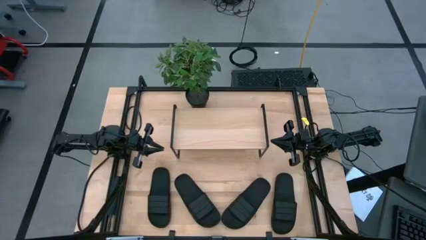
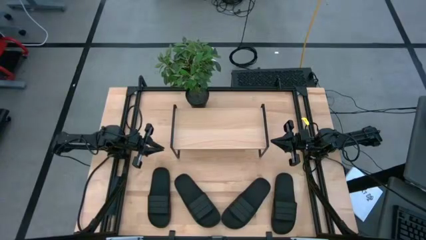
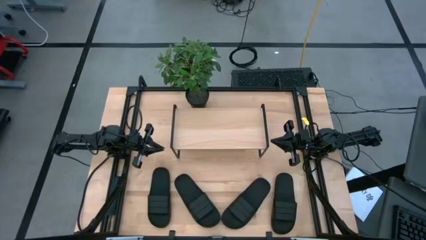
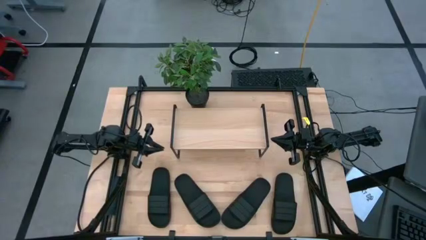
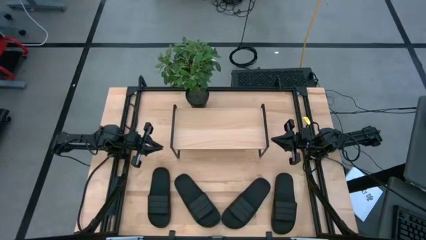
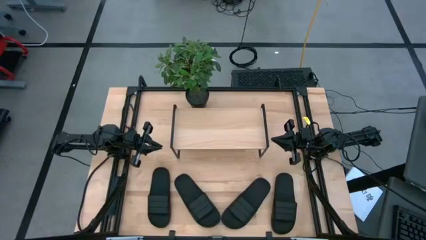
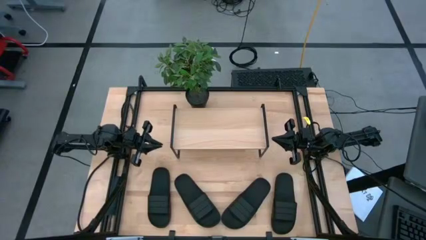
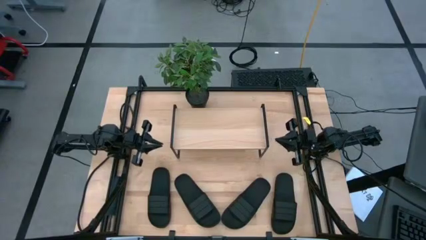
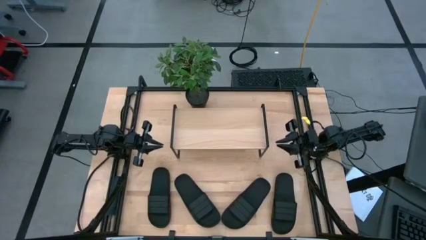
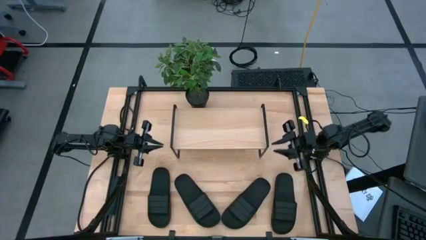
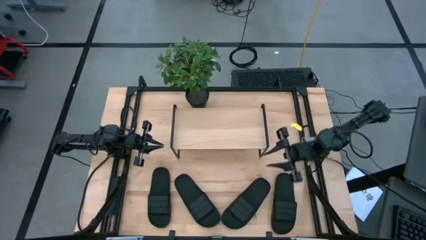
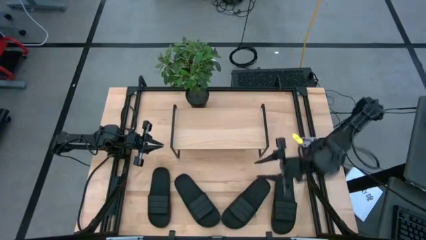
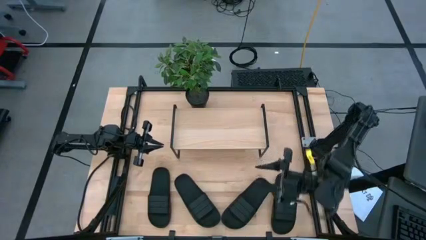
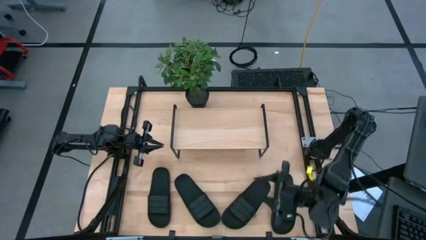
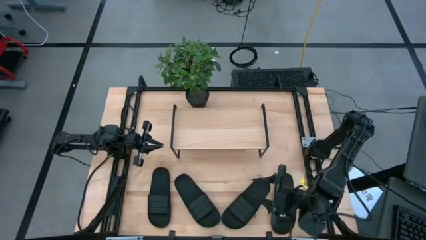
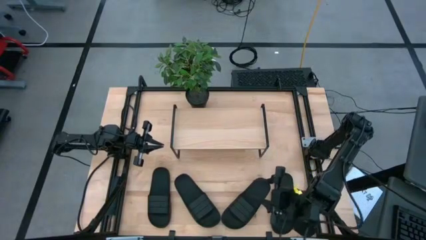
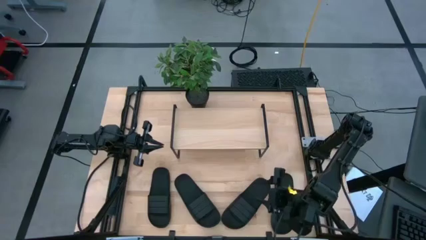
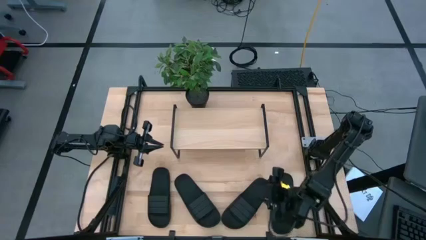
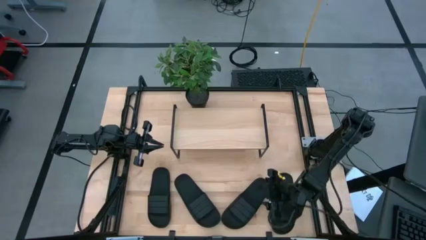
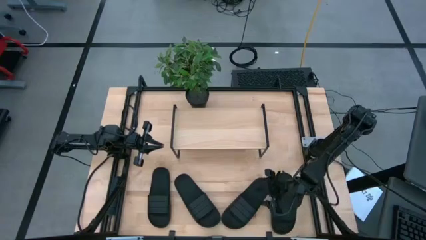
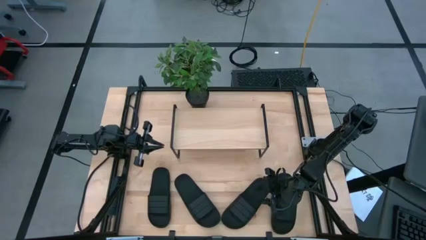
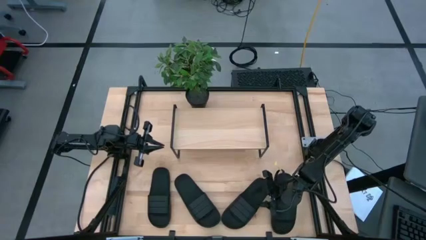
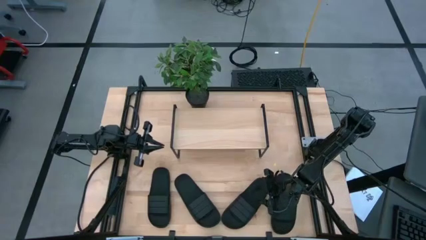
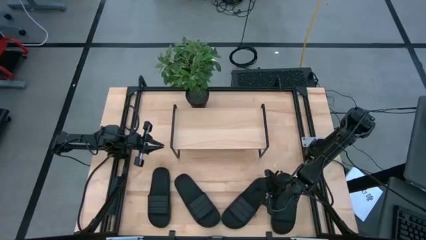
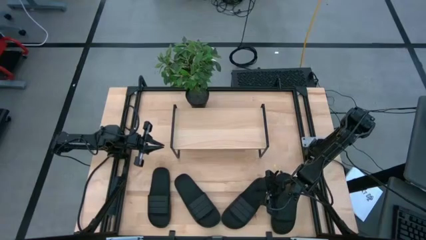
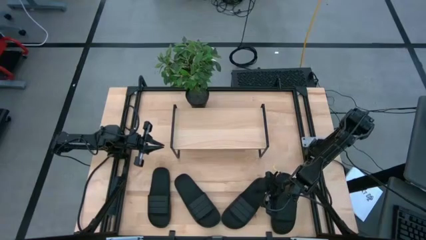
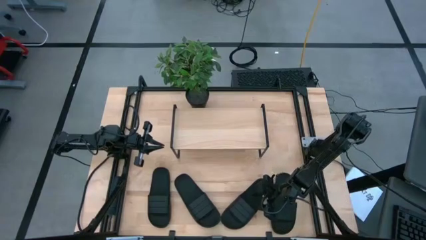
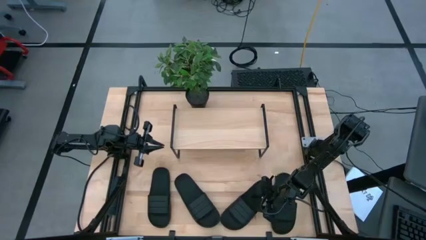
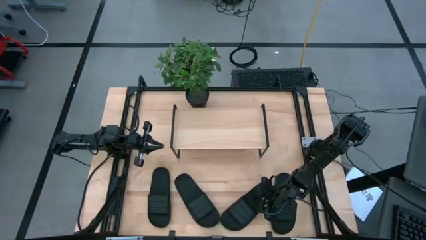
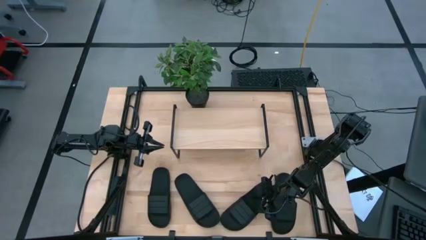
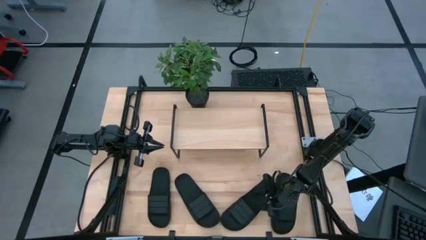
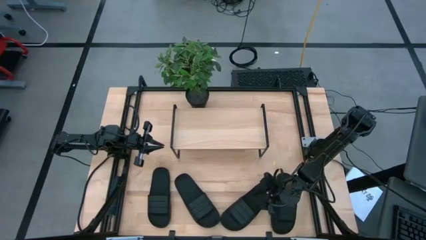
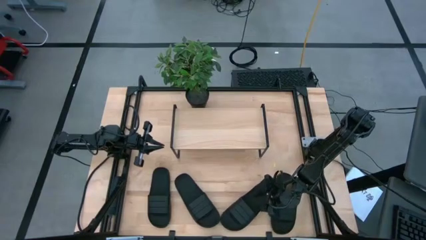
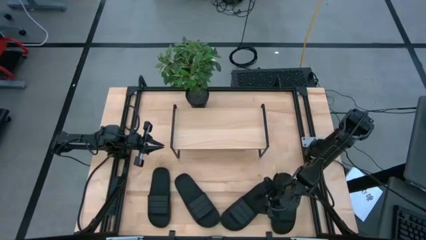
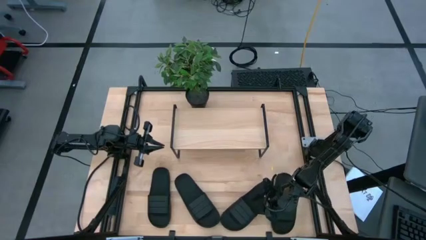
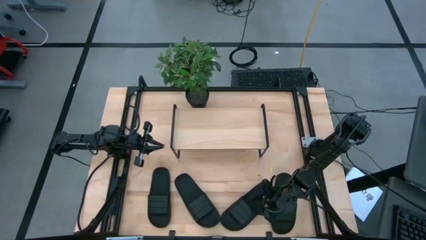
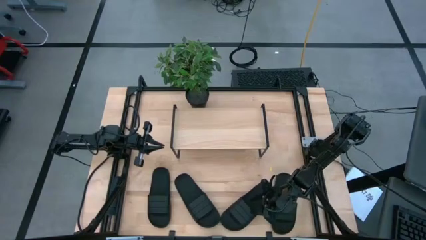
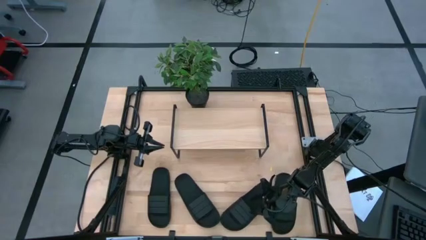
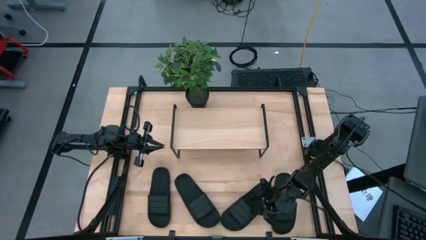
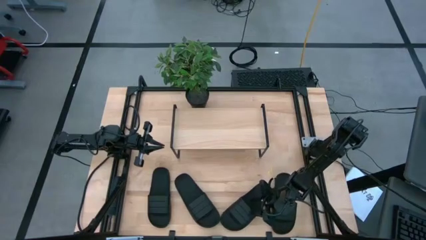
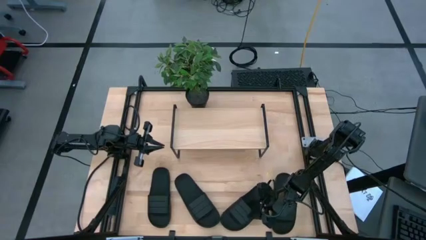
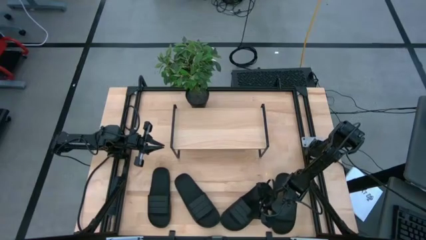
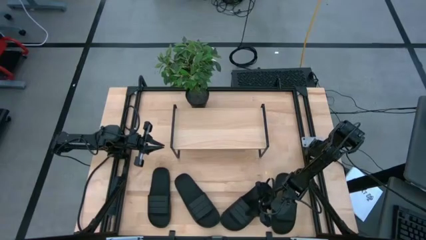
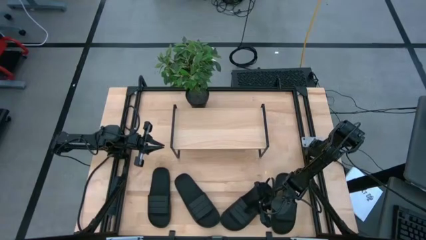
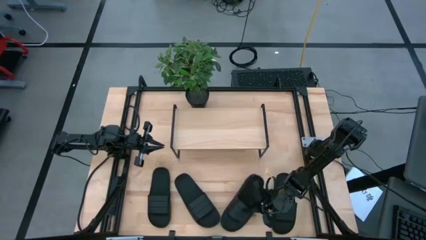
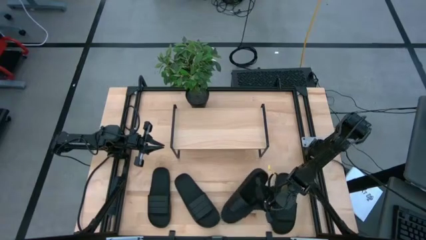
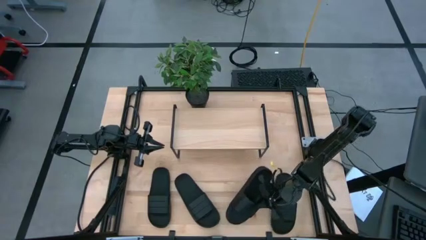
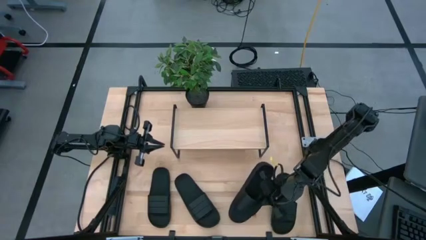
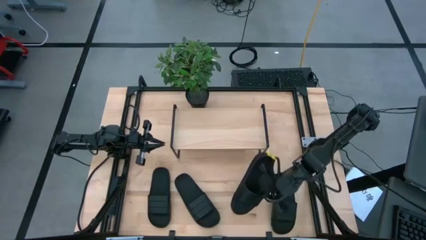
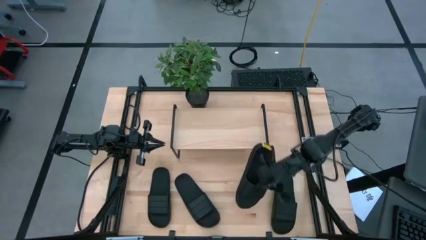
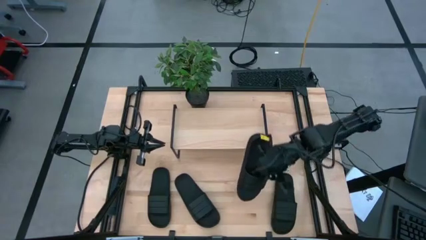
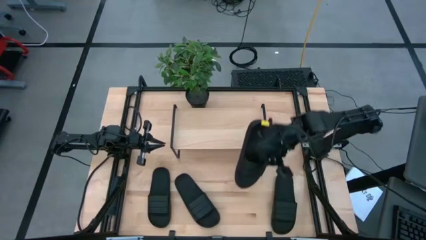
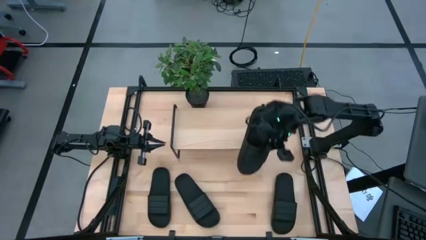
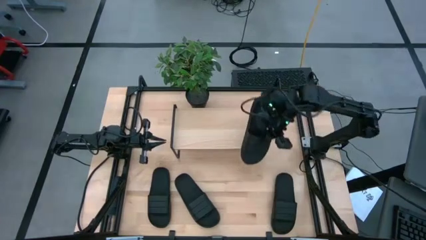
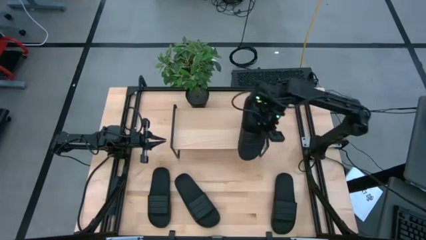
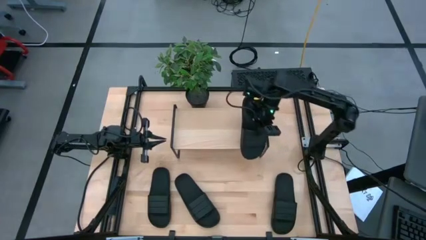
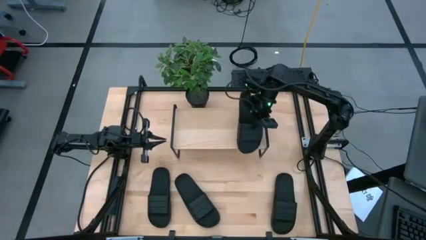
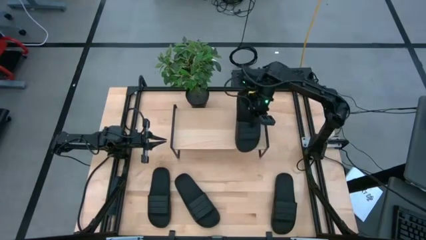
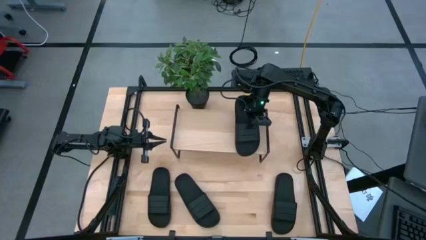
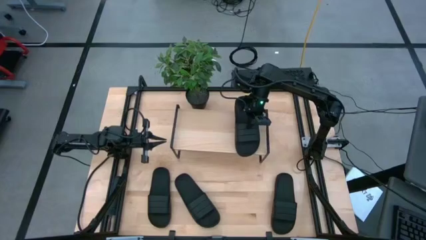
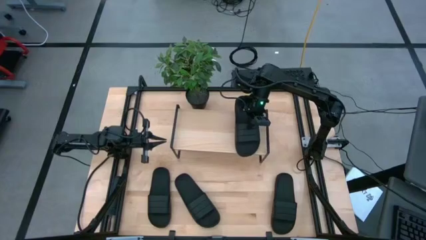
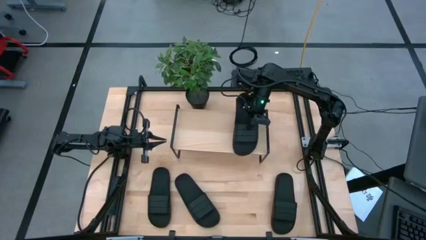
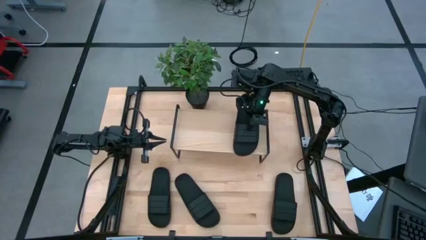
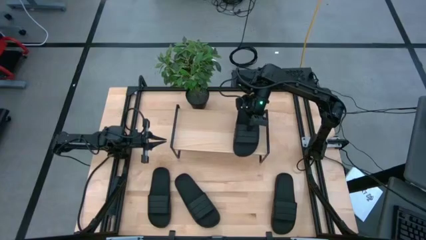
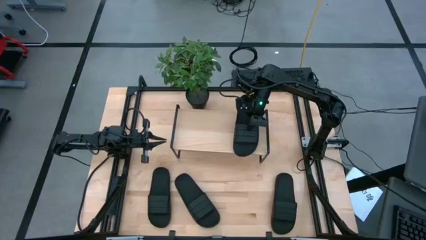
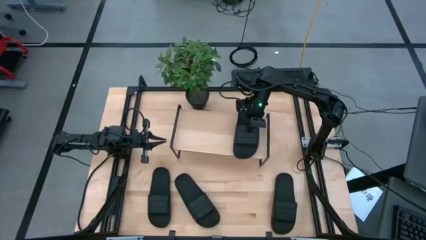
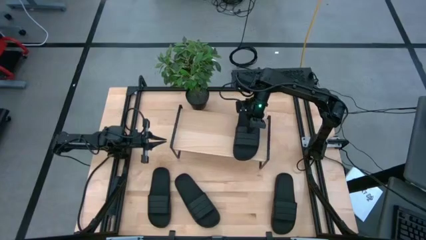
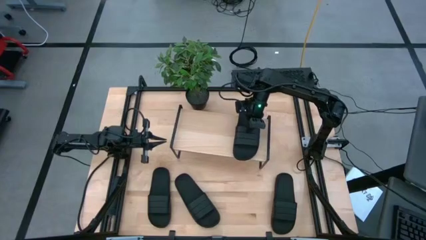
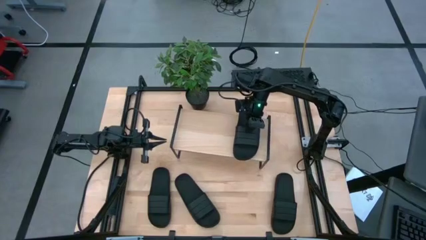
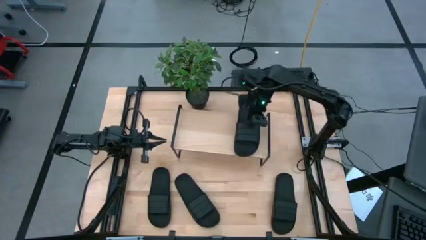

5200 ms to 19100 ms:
Task: Pick and place slides into the shelf
Put the middle right black slide on the shelf

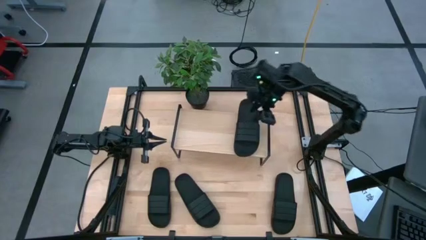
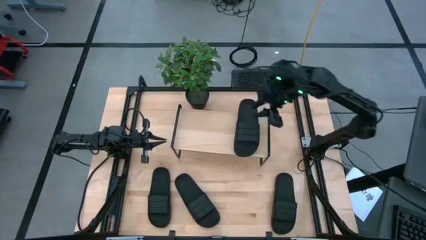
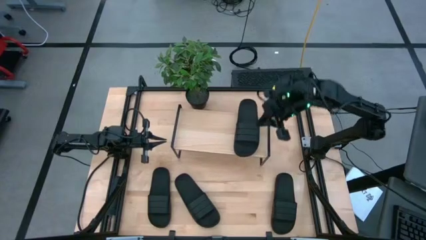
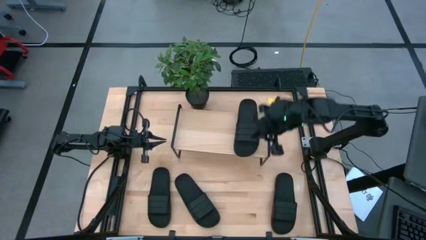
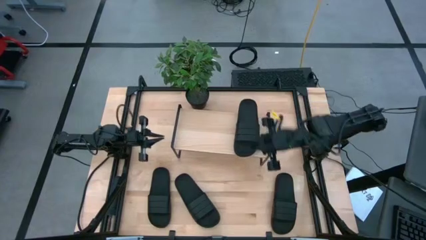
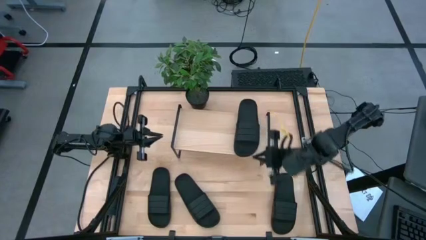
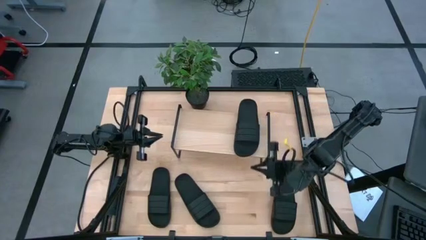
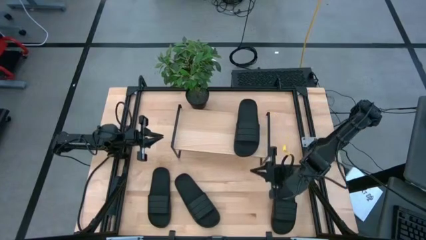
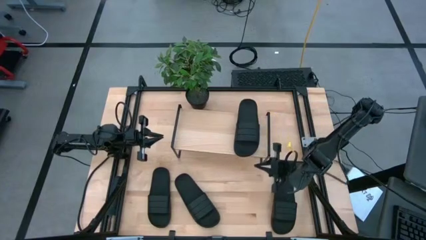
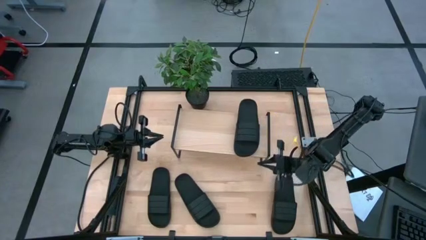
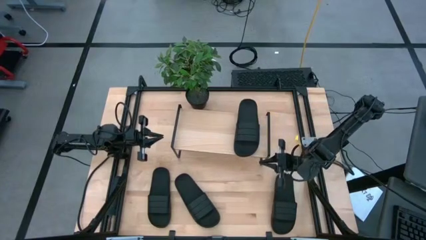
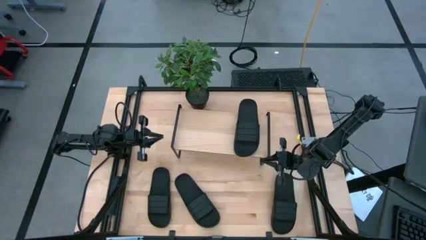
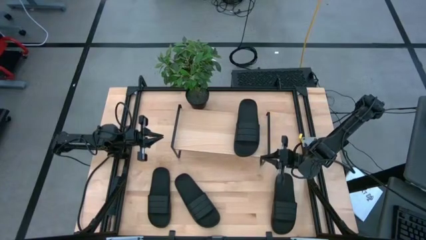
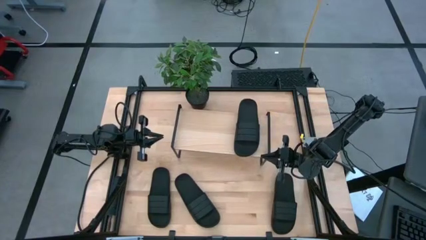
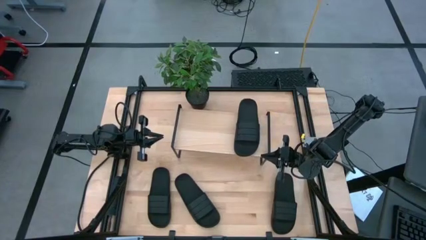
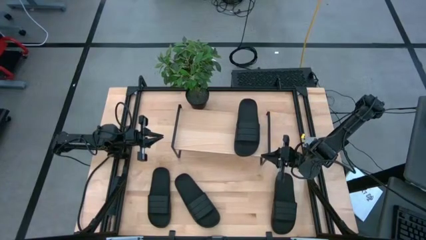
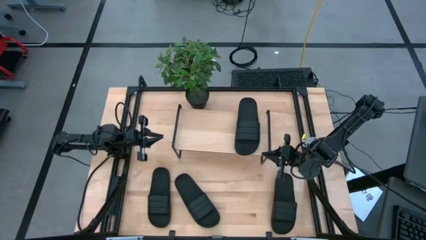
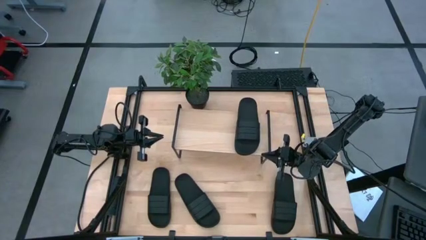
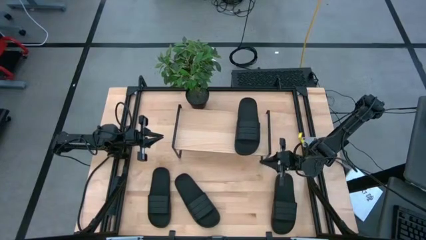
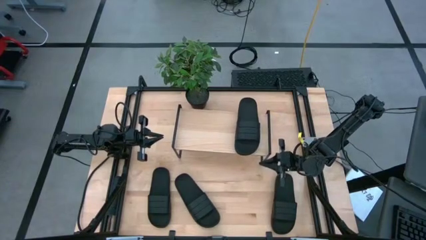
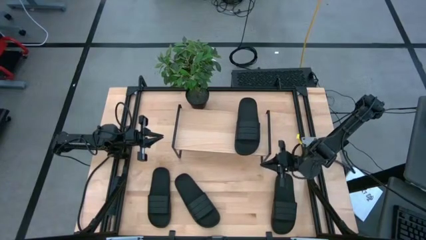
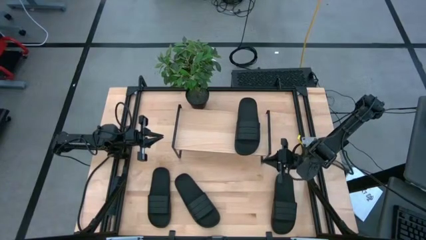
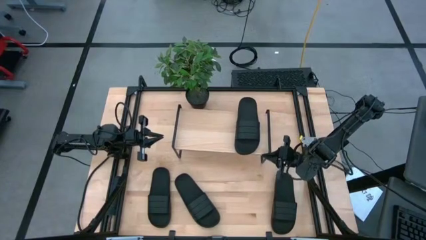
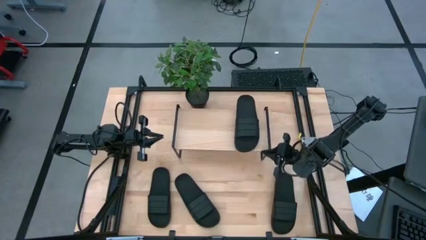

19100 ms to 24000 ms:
Adjust the shelf
